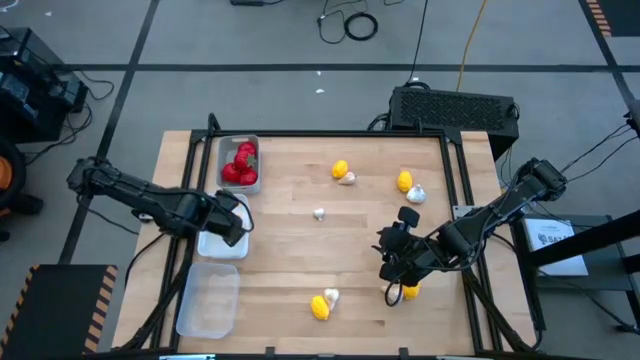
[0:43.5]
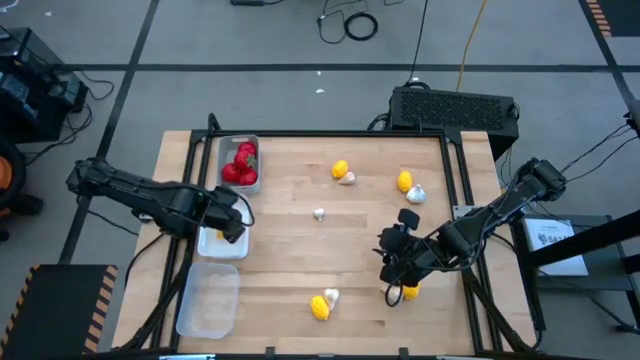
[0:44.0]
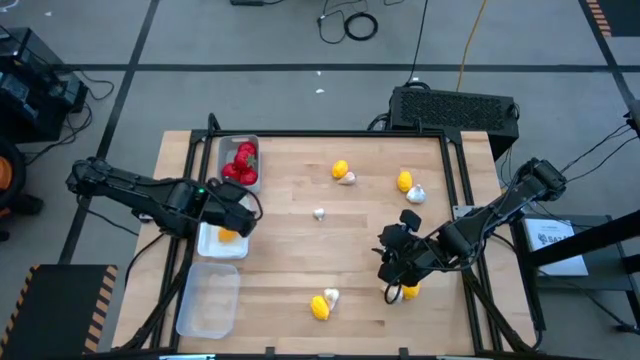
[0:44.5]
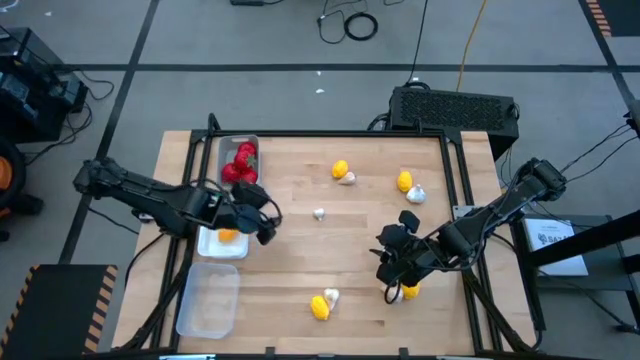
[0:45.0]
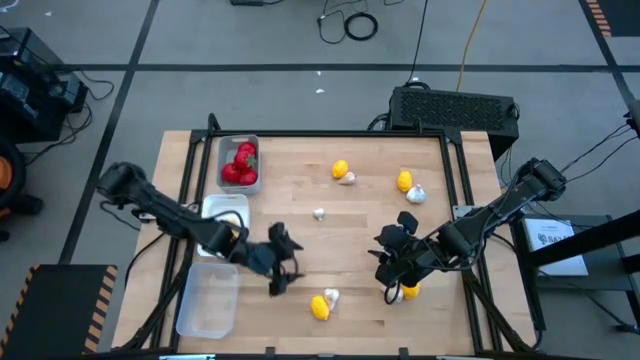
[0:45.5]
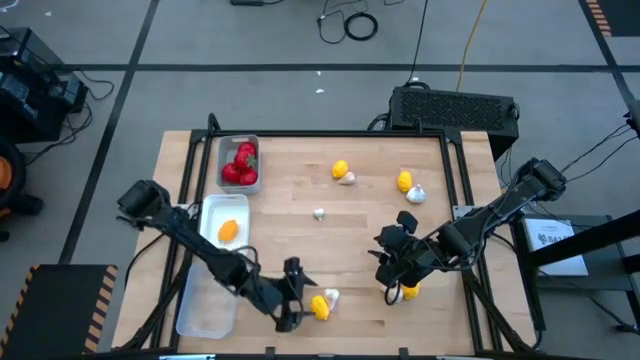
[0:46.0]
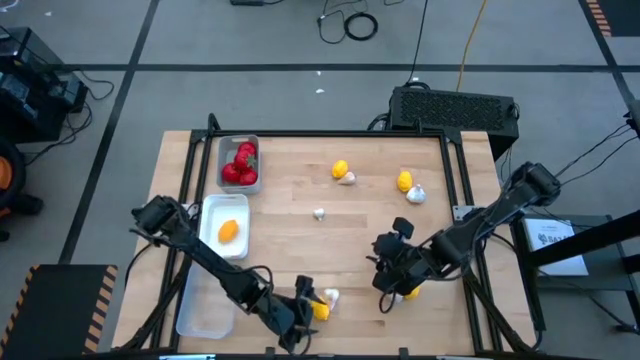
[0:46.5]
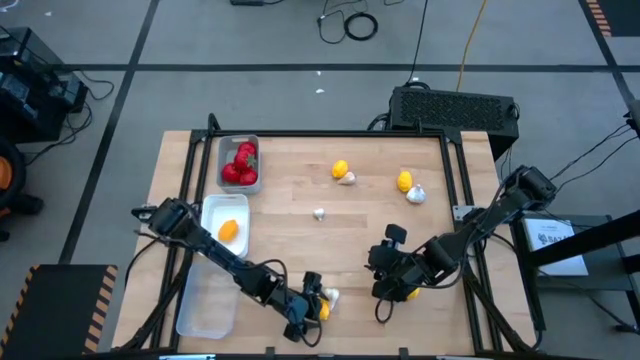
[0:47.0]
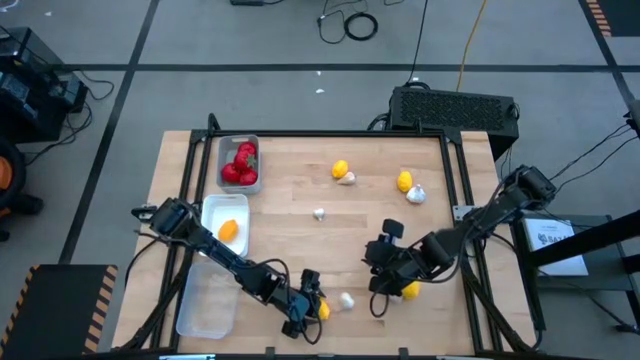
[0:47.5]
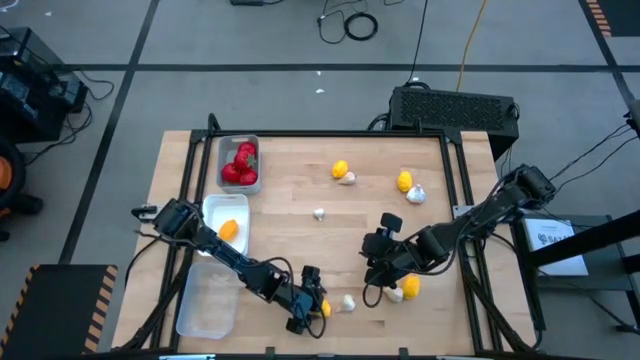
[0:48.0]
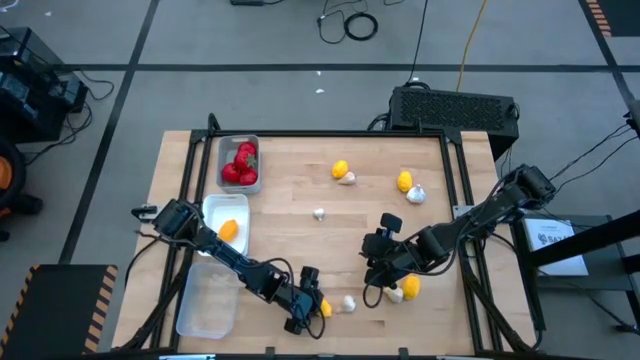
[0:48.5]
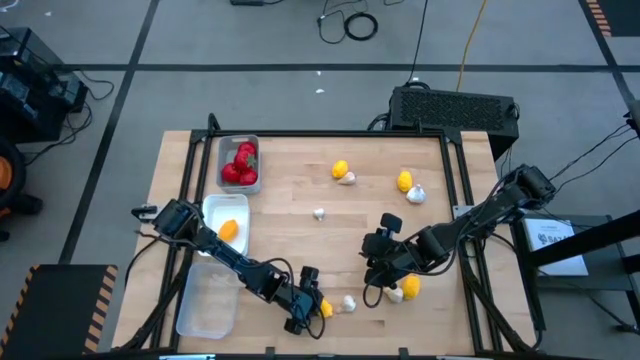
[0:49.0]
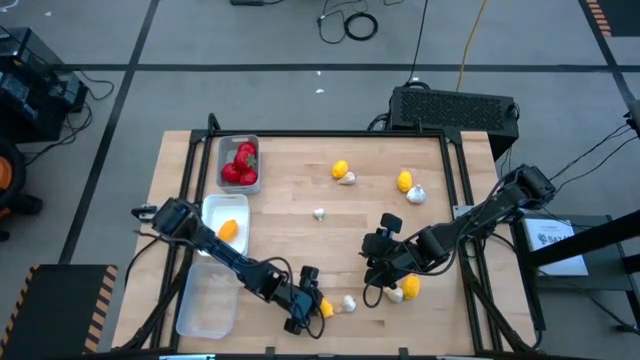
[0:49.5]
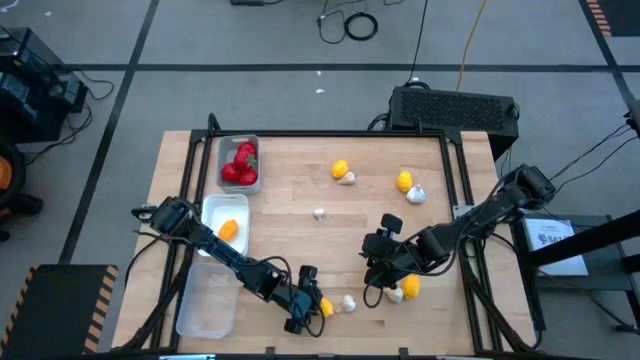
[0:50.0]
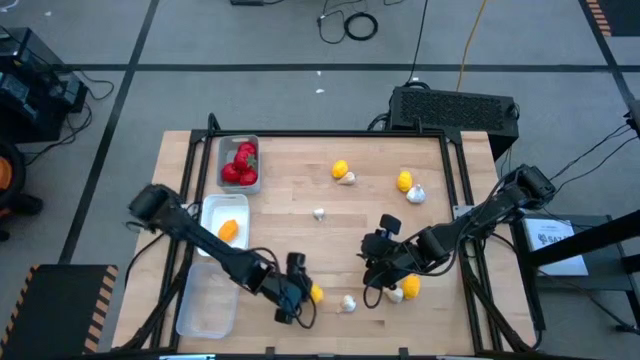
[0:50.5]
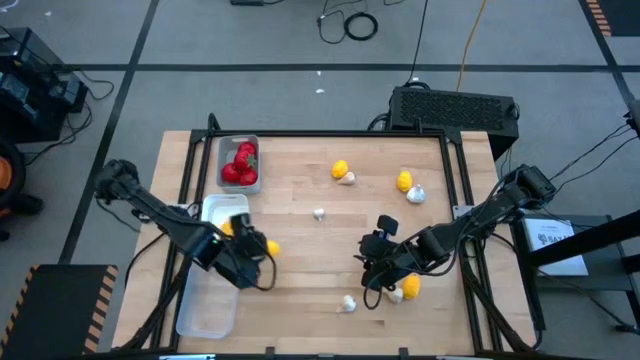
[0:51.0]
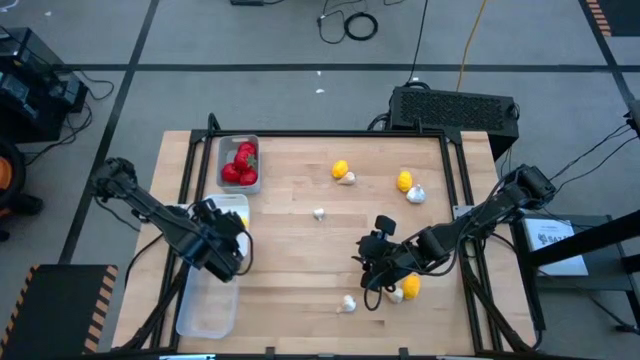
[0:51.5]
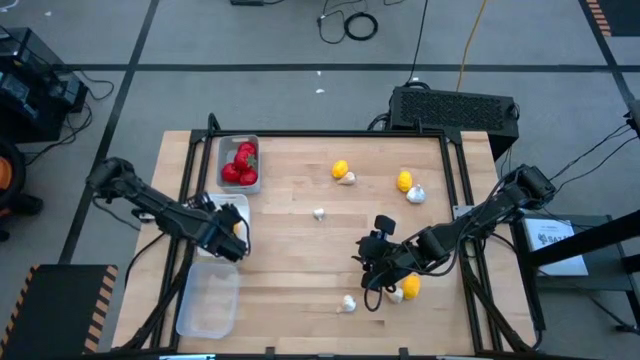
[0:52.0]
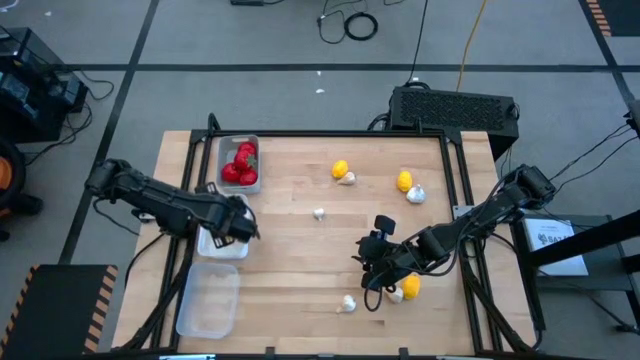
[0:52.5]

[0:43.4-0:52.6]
Task: Sort produce into baskets
Put the lemon into the white bin

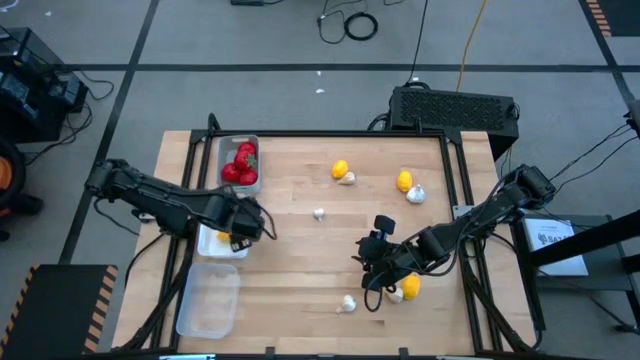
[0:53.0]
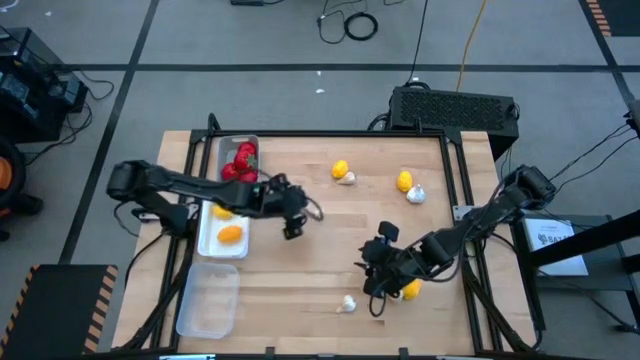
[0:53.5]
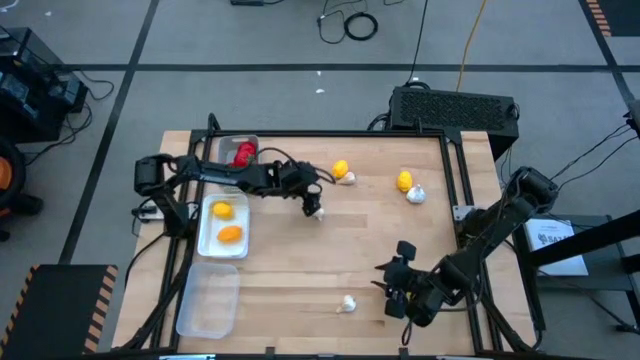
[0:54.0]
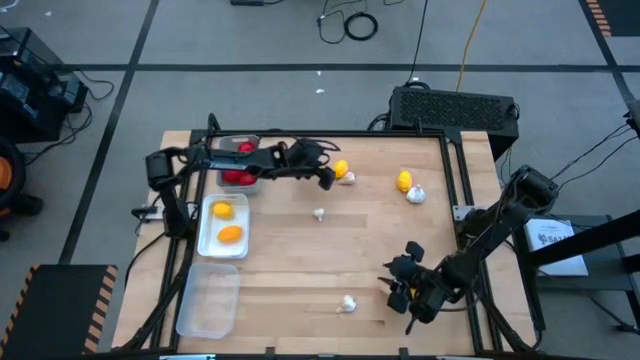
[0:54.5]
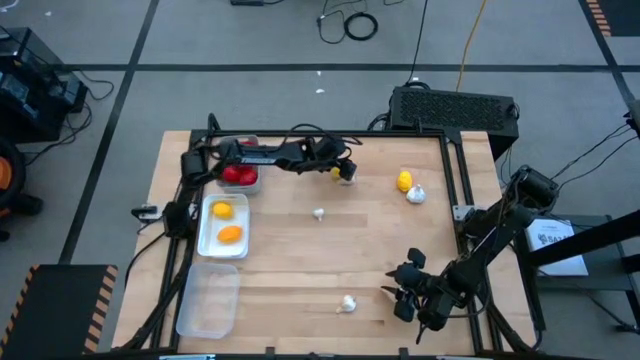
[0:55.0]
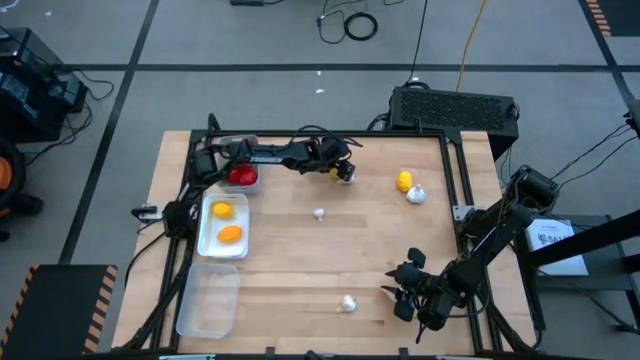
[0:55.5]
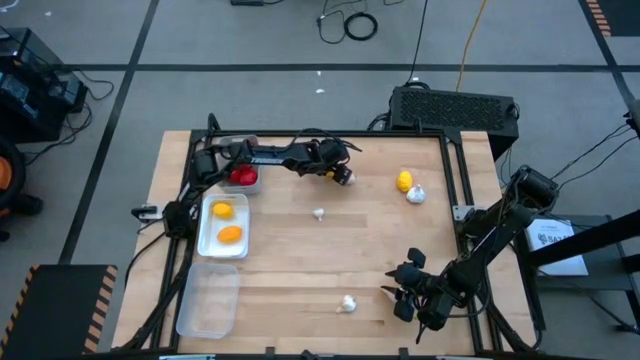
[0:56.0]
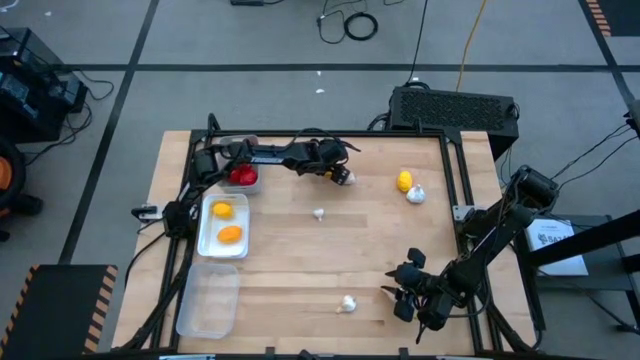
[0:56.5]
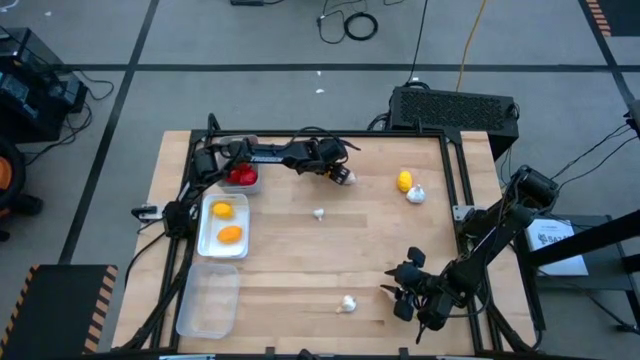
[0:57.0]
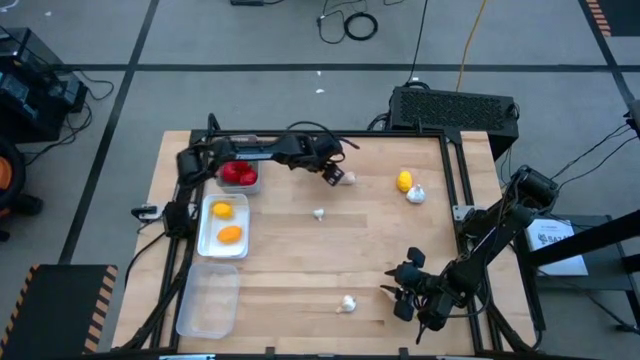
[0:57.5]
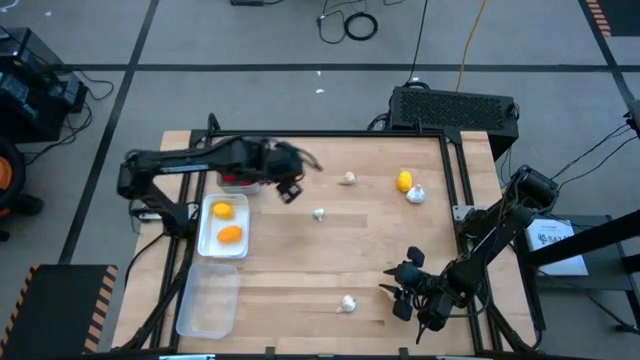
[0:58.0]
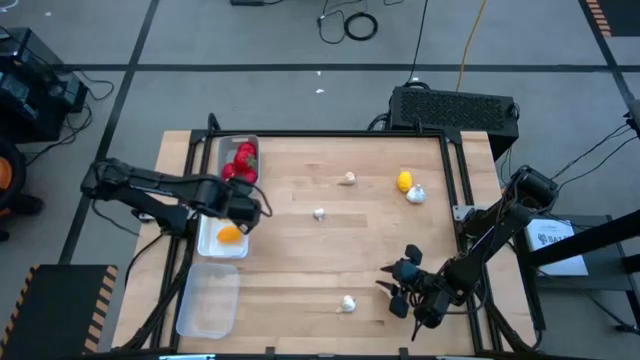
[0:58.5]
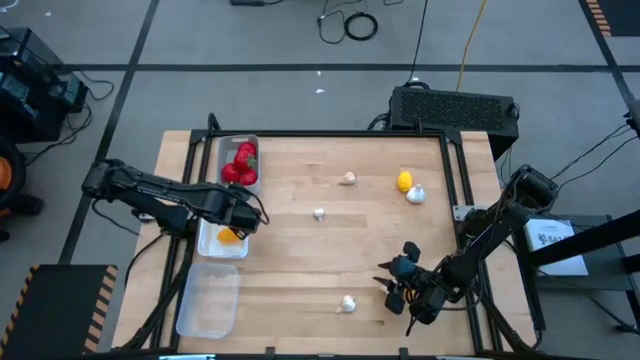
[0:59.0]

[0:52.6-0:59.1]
Put the lemon into the white bin

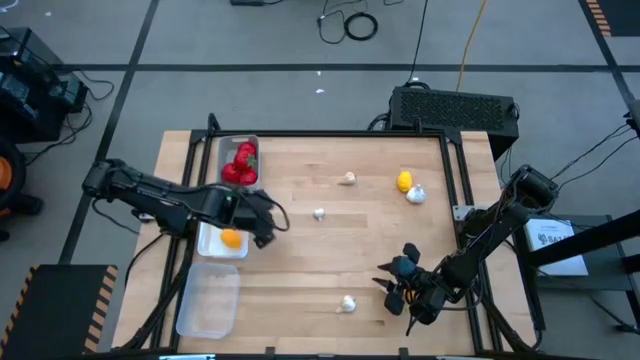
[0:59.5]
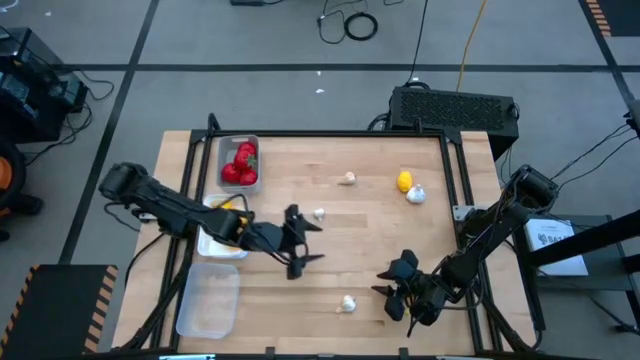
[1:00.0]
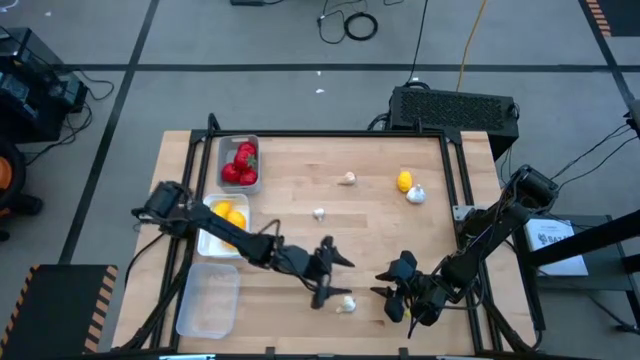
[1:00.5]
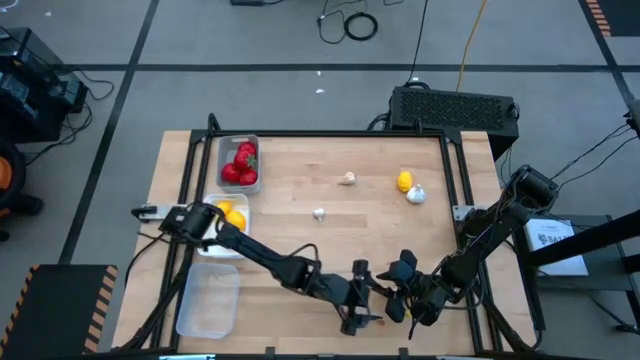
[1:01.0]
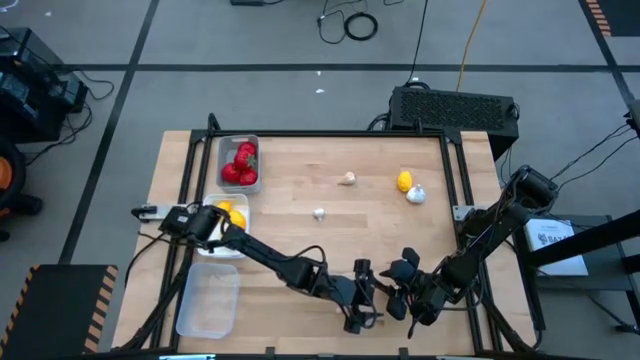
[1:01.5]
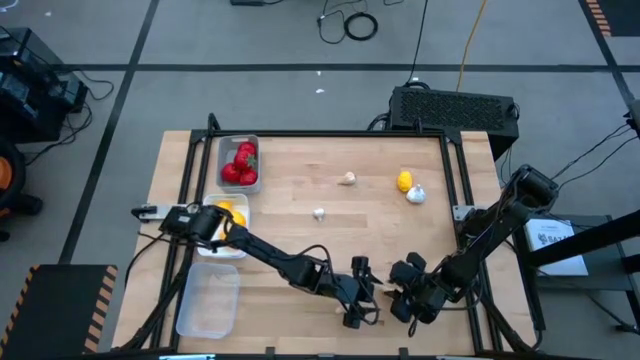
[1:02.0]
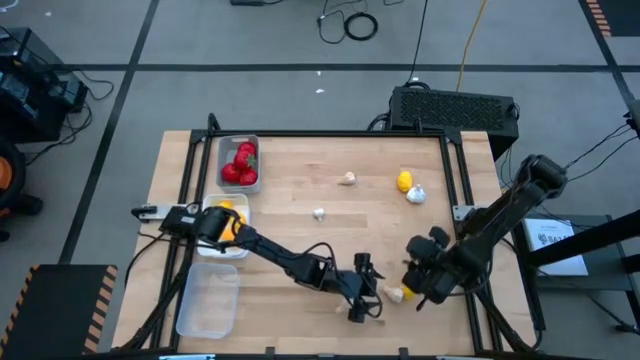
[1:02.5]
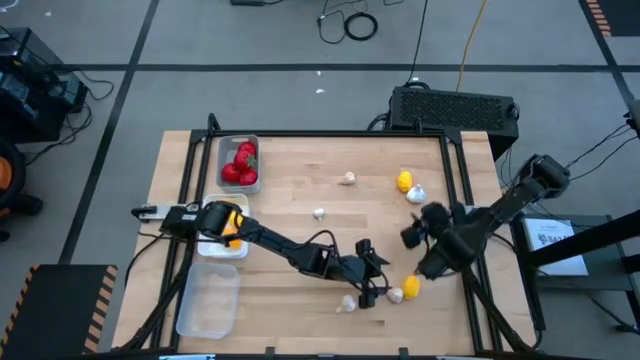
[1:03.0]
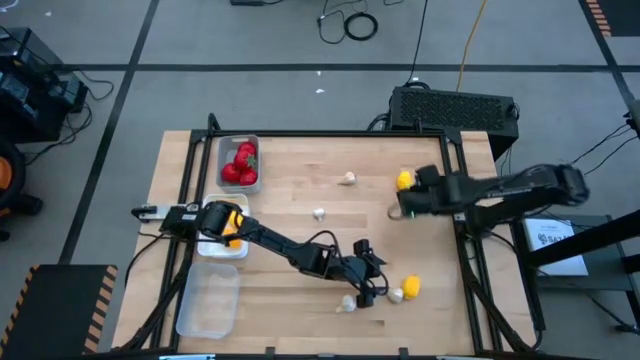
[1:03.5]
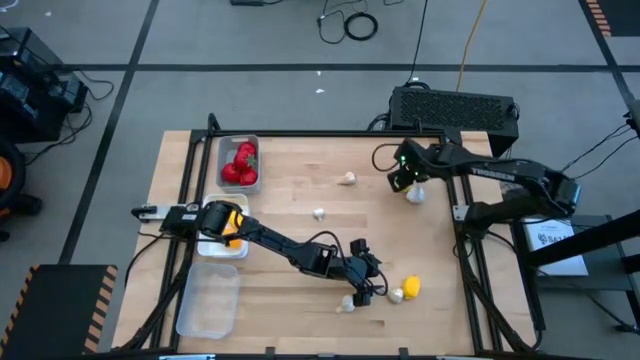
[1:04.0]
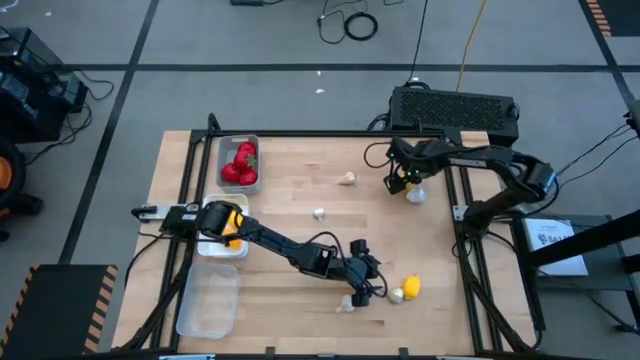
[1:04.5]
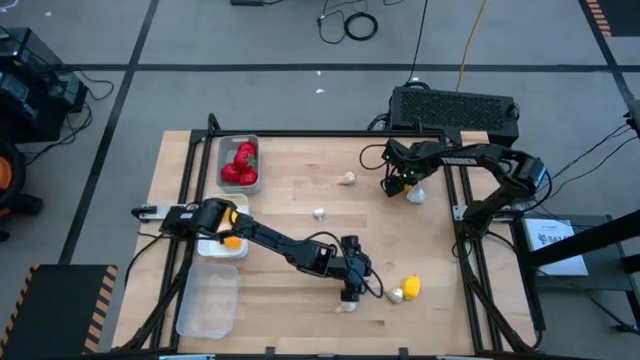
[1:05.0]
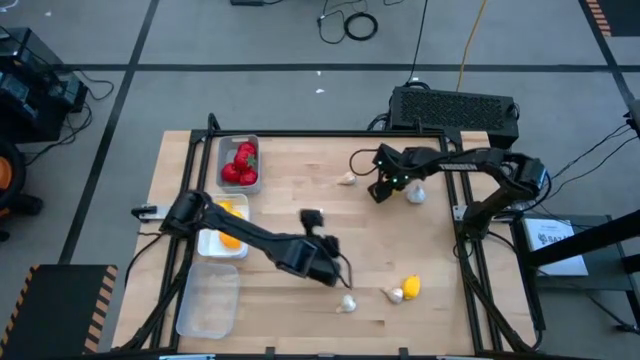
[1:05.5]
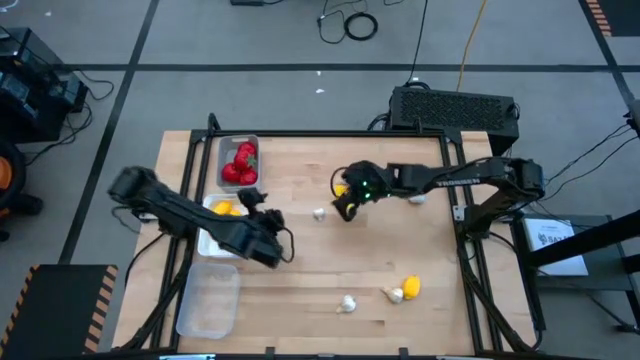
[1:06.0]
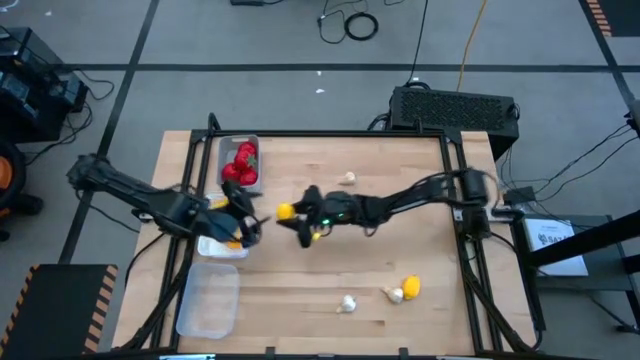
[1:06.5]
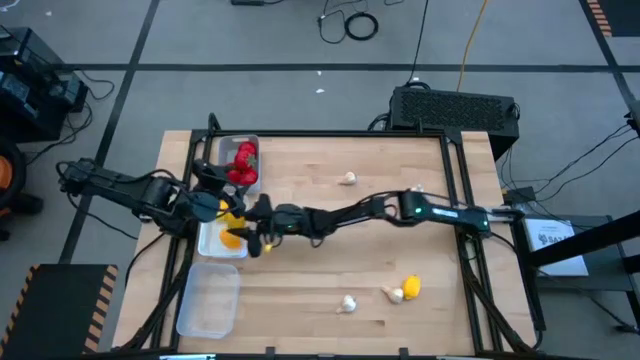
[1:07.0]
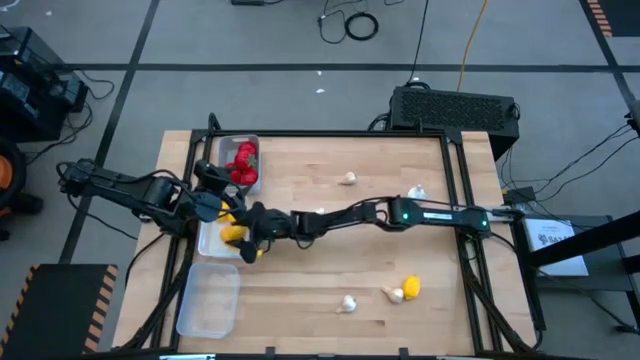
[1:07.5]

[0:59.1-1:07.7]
Put the lemon into the white bin
